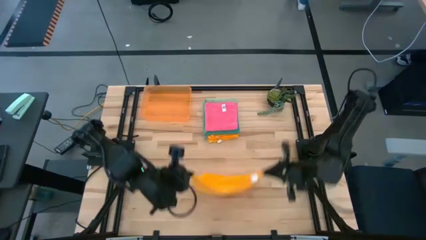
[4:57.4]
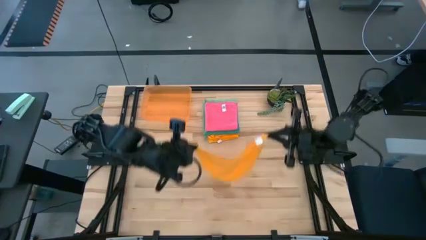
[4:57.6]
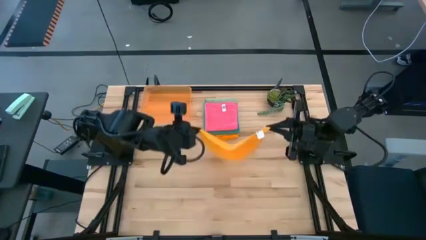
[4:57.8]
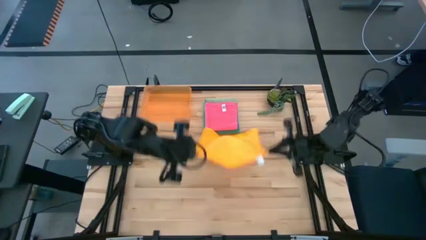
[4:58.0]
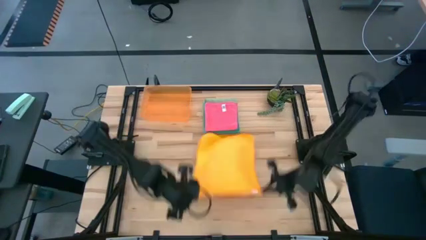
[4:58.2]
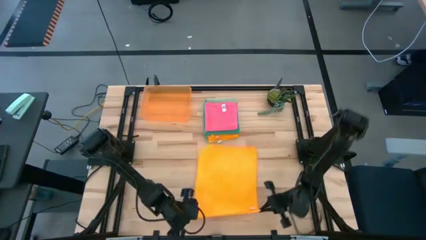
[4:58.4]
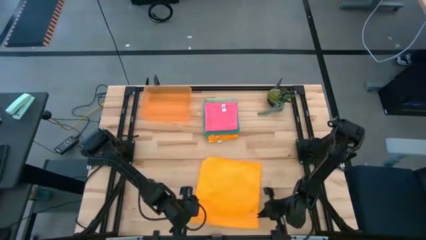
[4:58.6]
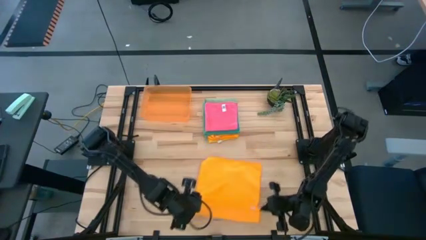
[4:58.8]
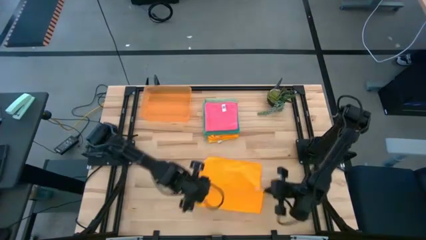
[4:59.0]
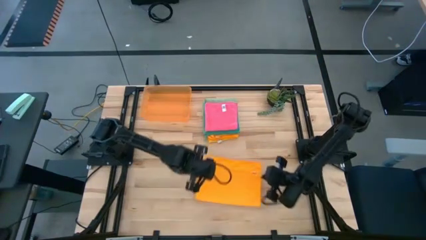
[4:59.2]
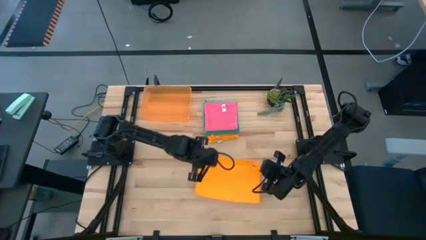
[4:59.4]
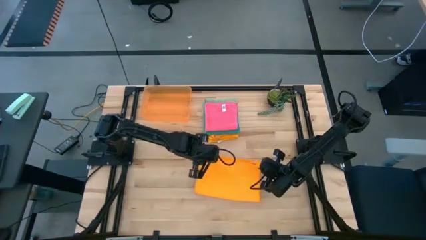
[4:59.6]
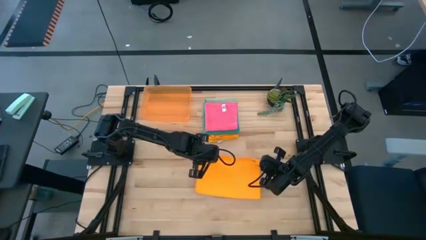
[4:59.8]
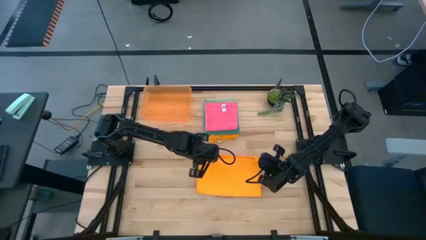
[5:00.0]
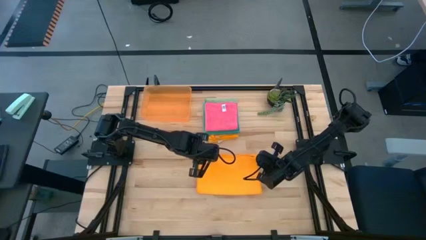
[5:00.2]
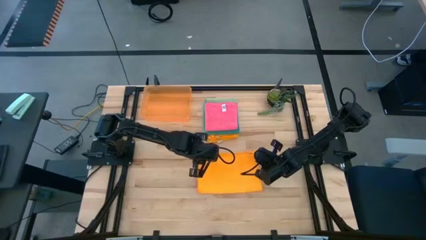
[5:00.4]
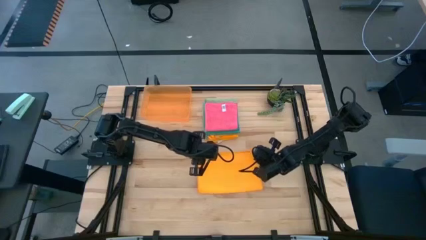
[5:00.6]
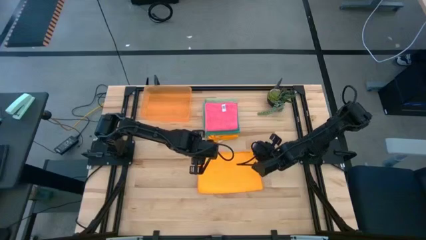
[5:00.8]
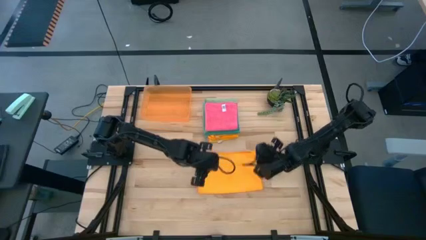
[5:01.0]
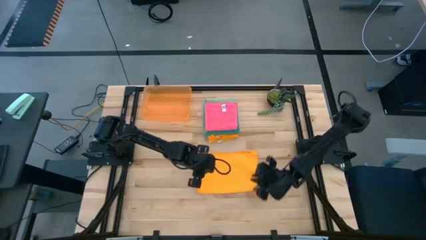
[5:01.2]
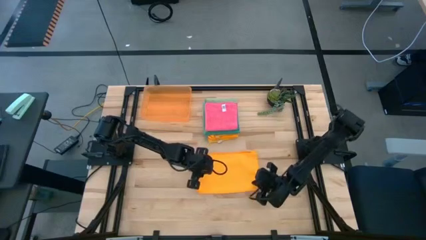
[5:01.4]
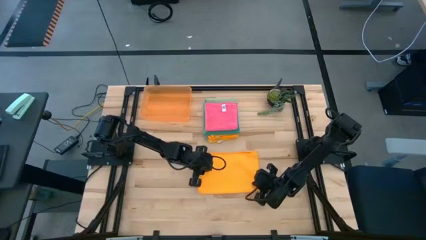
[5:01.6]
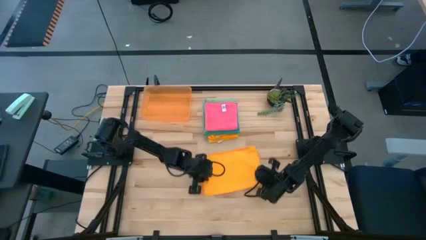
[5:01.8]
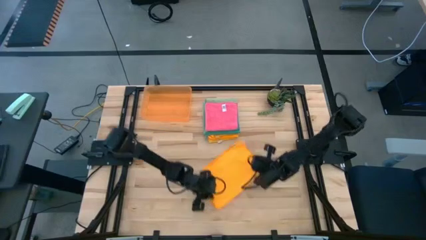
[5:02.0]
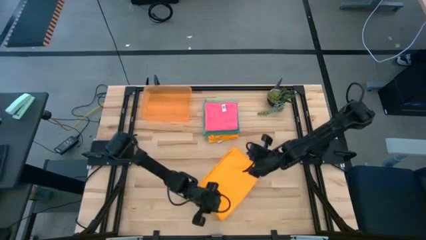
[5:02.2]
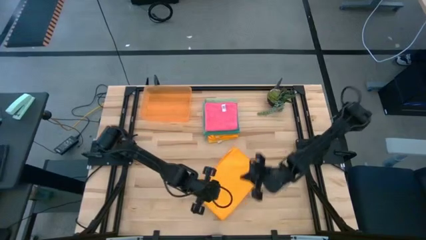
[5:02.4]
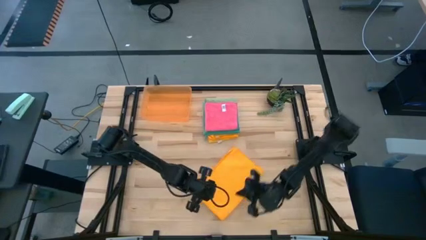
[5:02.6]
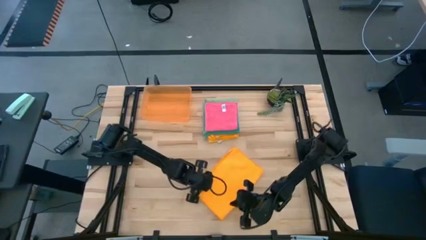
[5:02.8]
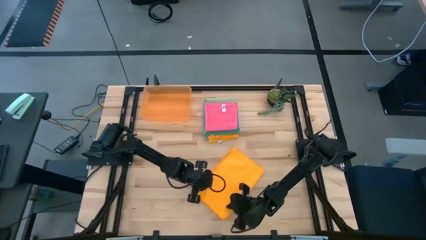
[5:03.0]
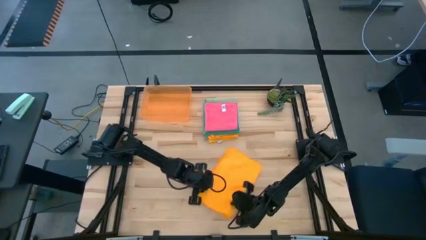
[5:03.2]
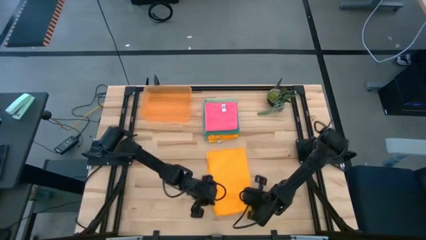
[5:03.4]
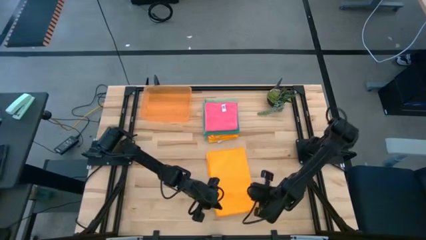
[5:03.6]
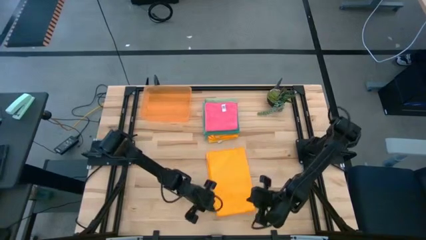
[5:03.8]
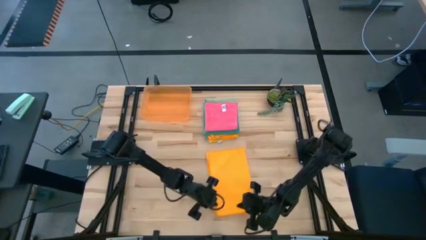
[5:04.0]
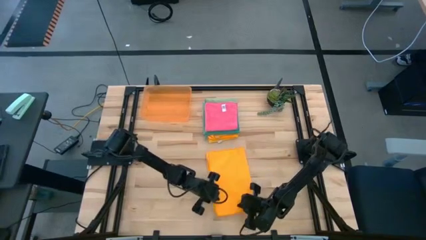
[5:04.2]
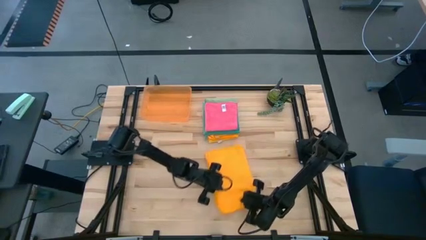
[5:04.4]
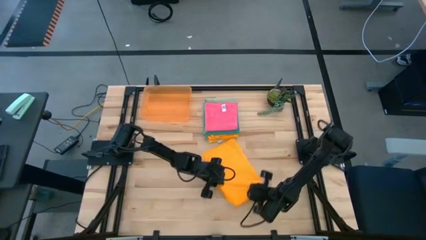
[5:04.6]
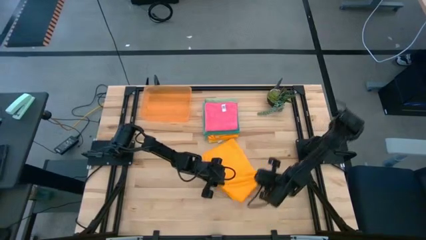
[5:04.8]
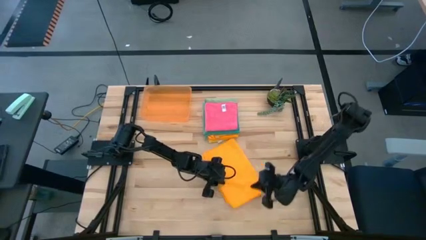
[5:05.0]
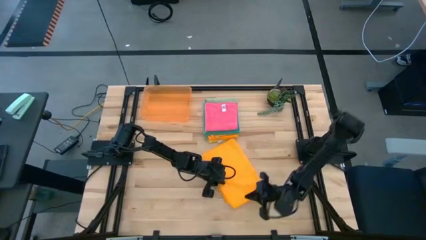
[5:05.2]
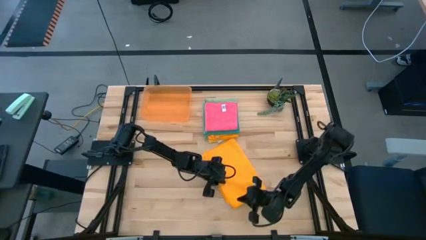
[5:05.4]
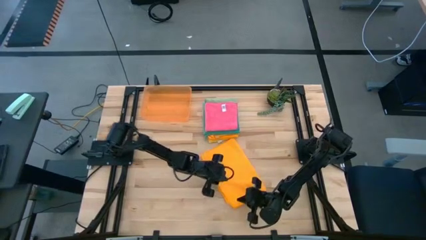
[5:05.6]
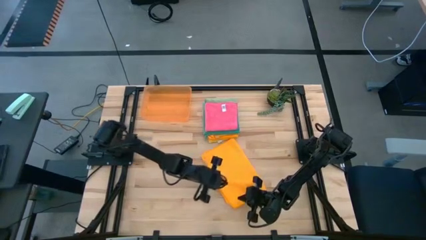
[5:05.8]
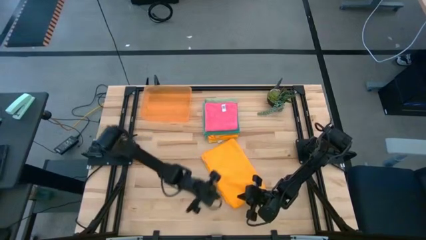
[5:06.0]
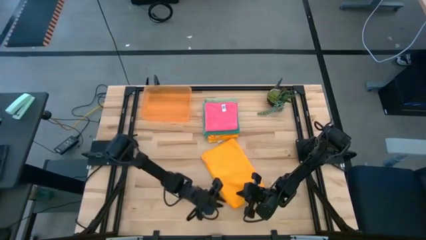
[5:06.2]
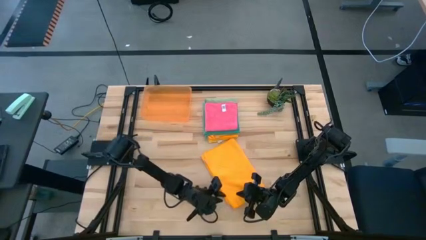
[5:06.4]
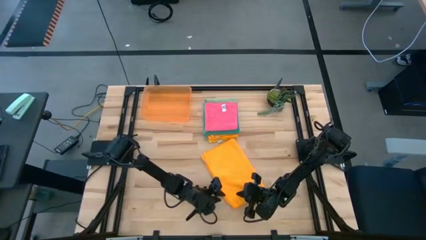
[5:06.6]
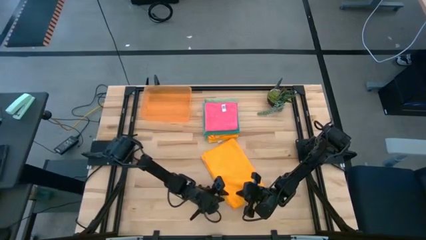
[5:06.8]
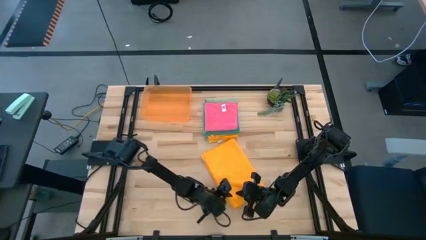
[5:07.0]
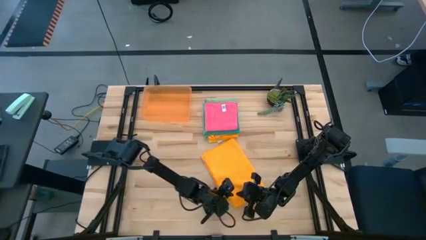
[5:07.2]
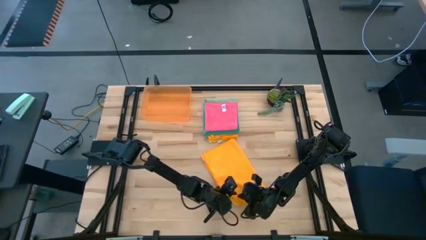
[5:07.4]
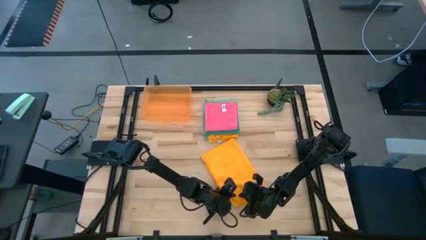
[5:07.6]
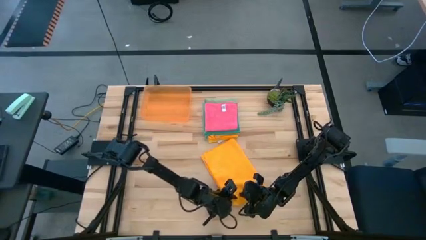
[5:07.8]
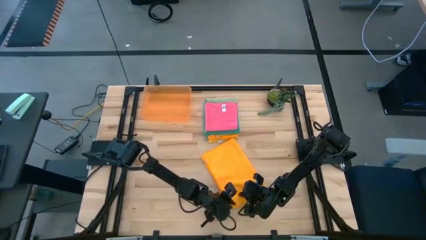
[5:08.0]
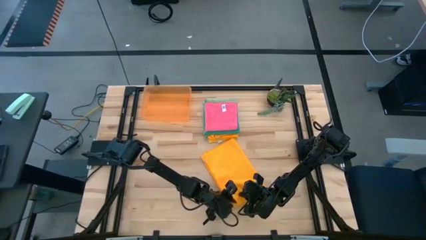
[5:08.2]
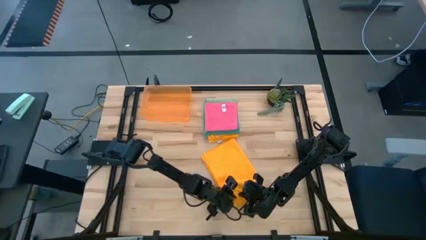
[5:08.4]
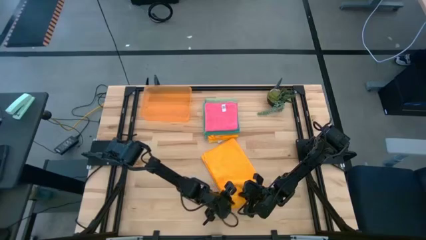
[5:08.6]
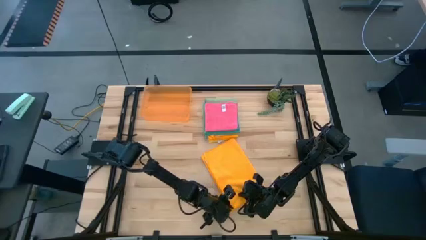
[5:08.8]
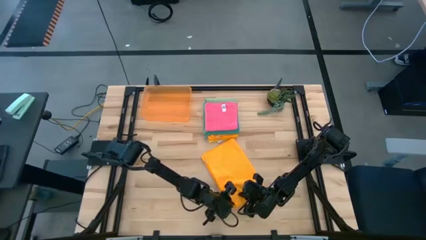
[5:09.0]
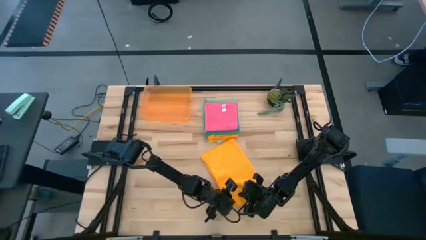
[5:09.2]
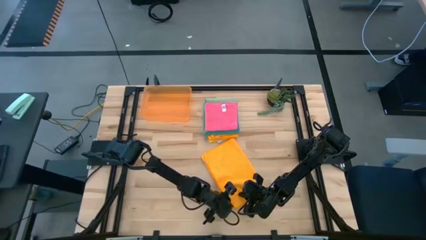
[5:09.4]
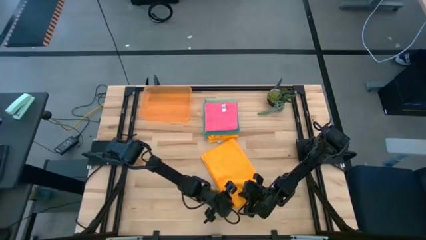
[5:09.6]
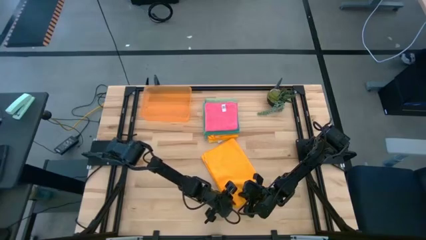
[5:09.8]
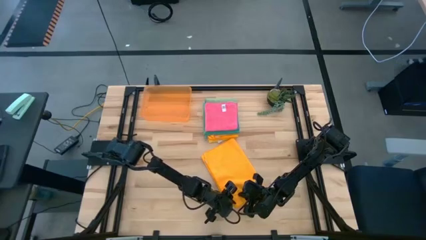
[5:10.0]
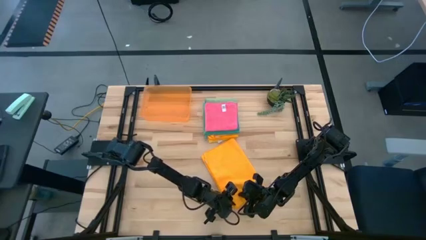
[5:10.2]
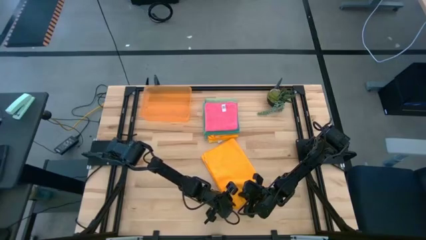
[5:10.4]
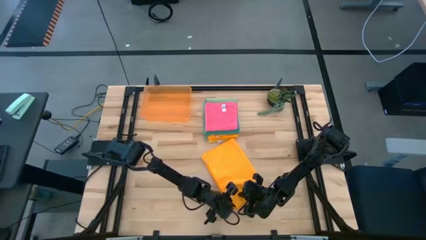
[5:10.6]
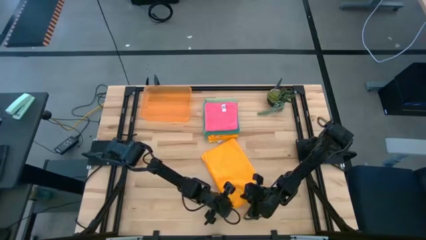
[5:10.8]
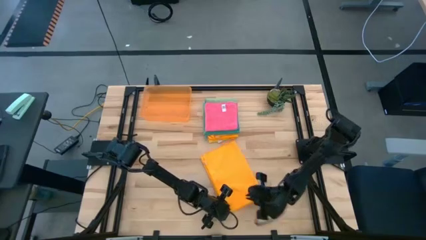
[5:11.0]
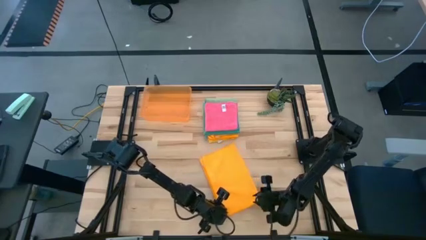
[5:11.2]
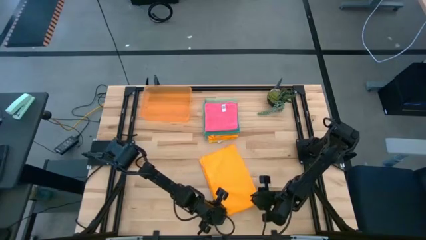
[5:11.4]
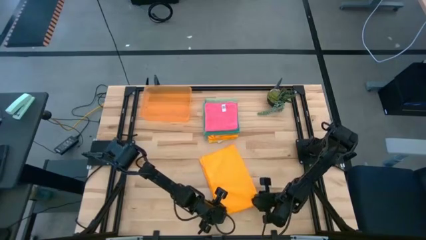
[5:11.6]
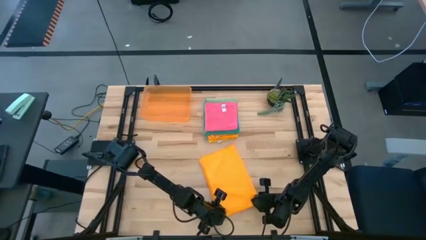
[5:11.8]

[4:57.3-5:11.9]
Task: Fold microfiber towels
Fold the orange towel

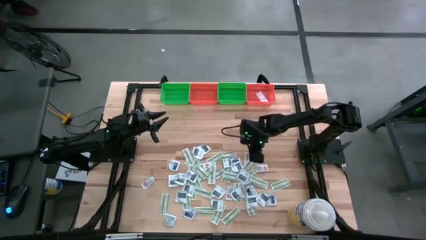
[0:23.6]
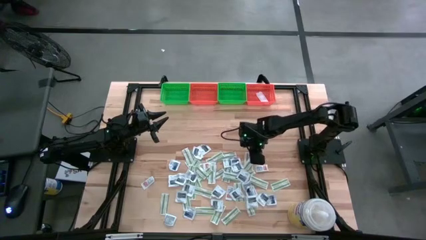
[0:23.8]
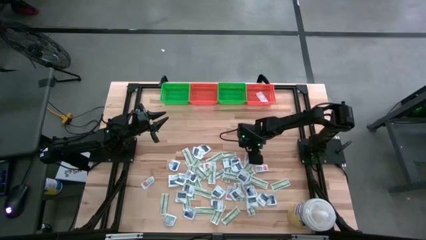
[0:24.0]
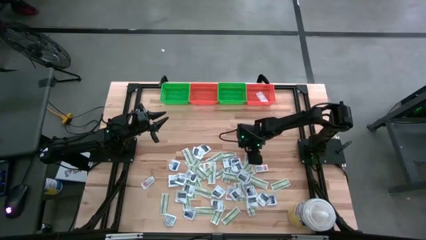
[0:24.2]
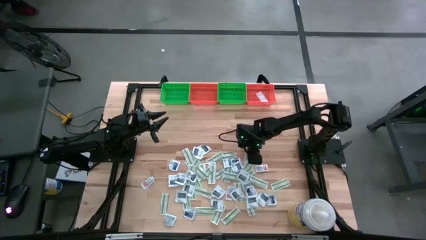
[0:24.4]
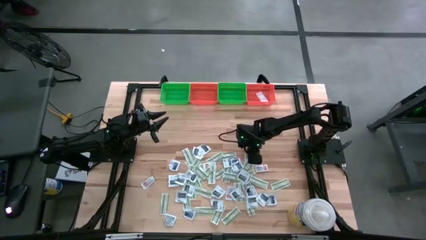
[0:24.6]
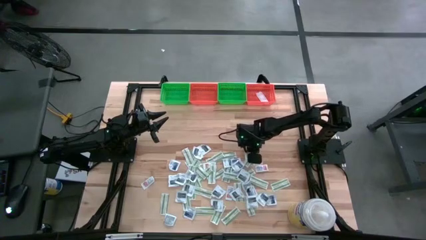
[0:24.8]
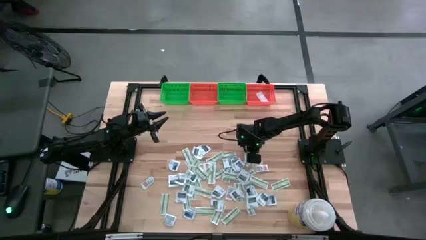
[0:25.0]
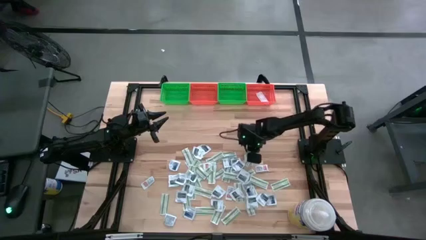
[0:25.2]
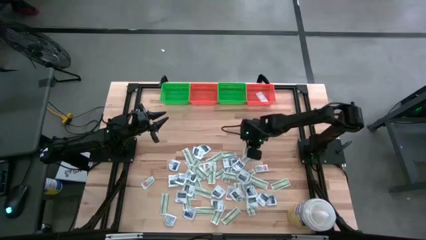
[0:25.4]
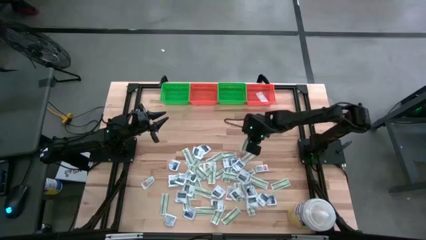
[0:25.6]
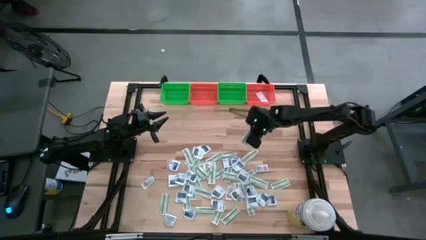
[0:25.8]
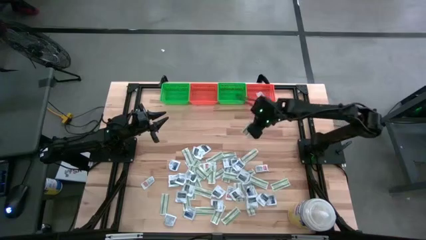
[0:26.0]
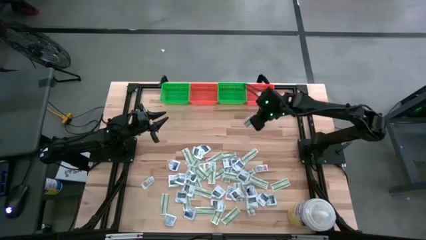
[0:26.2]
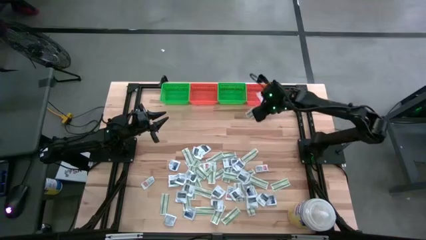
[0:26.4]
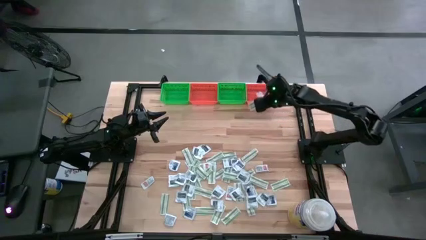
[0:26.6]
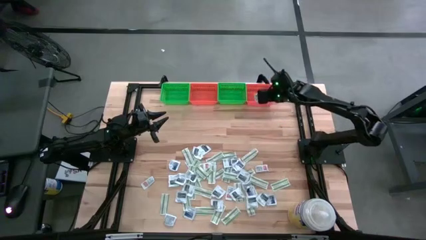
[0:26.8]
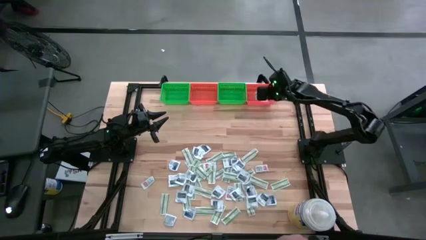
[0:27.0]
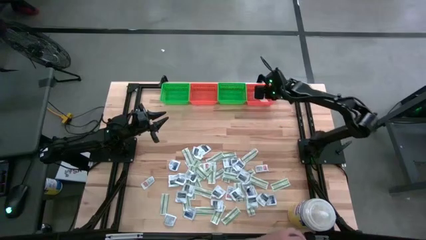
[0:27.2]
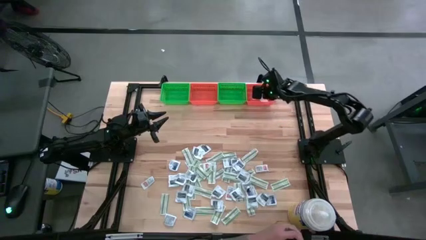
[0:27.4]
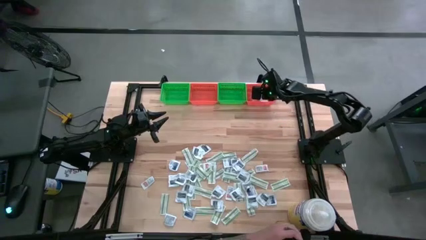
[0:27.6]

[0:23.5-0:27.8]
Task: Pick & Place First Aid Supplies
Put the green bandage pack in the right orange bin
